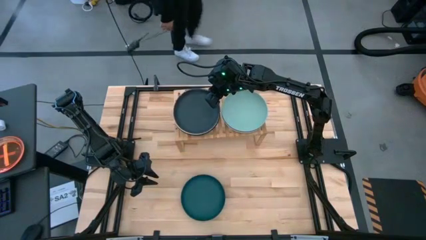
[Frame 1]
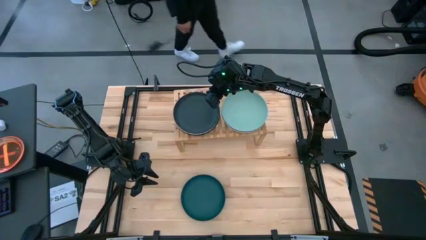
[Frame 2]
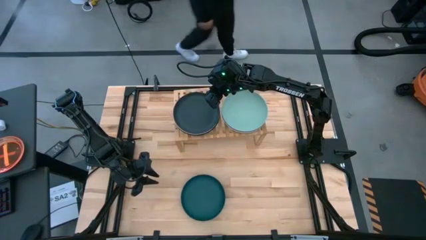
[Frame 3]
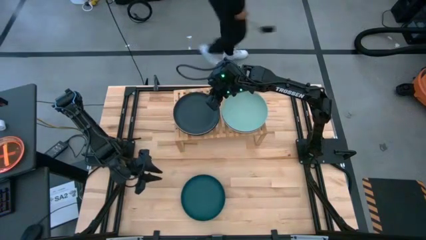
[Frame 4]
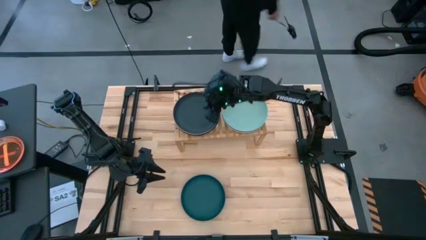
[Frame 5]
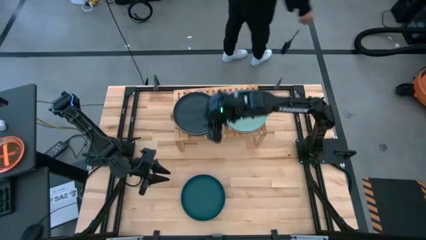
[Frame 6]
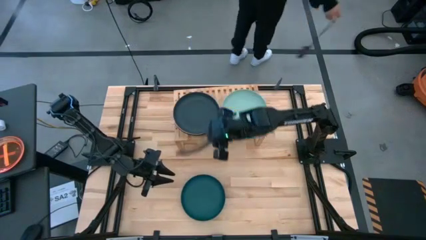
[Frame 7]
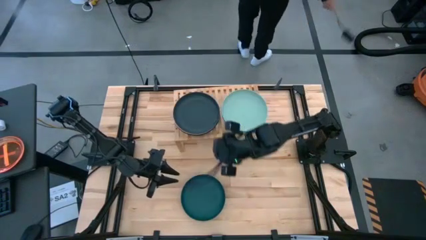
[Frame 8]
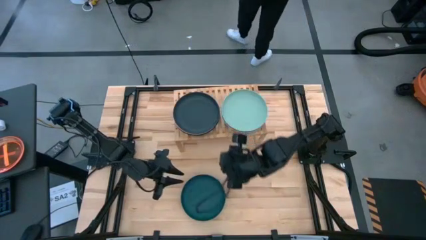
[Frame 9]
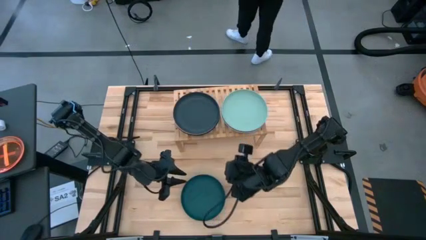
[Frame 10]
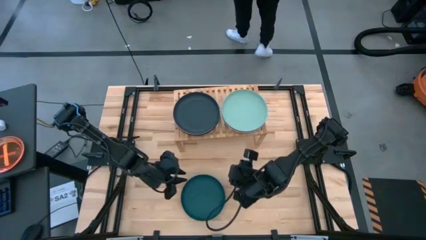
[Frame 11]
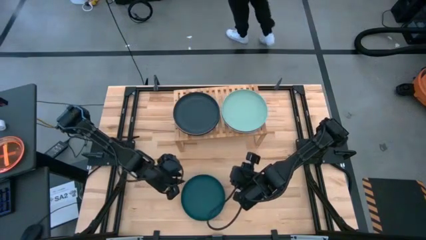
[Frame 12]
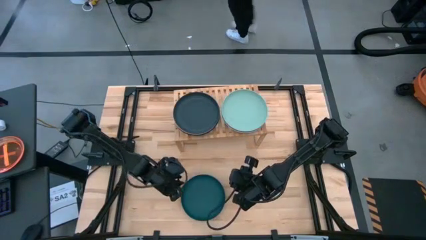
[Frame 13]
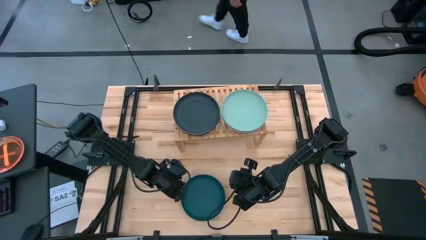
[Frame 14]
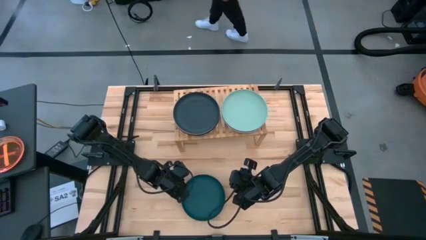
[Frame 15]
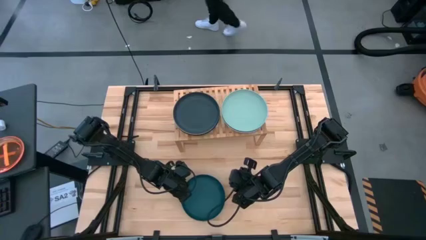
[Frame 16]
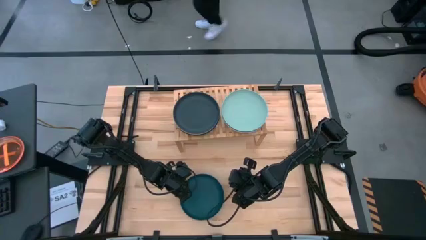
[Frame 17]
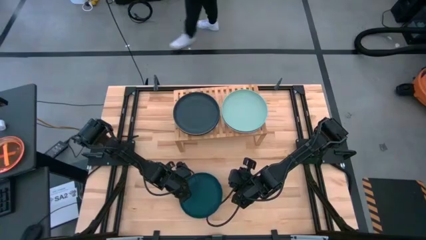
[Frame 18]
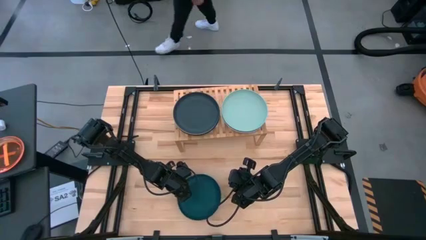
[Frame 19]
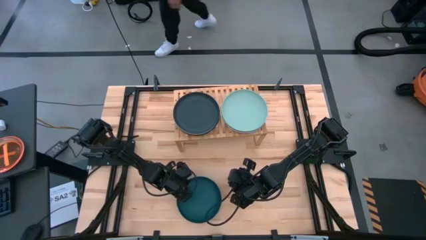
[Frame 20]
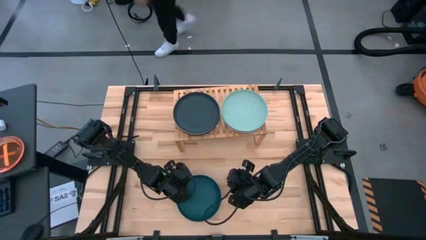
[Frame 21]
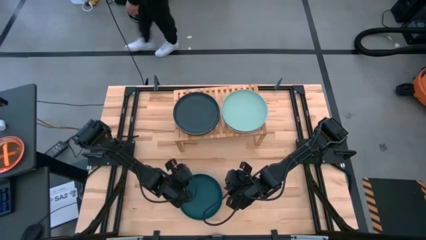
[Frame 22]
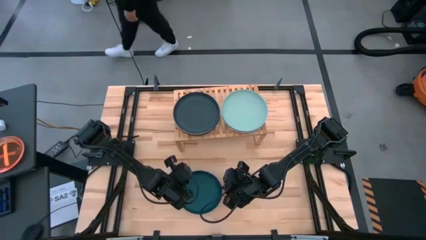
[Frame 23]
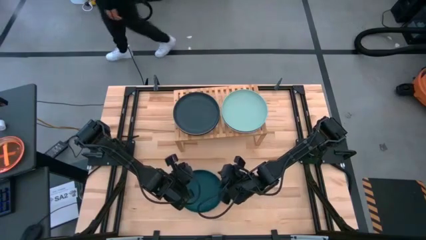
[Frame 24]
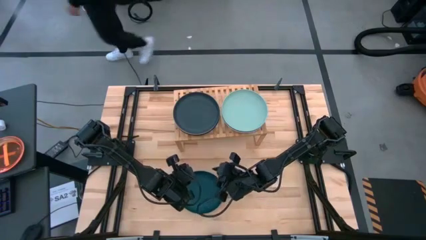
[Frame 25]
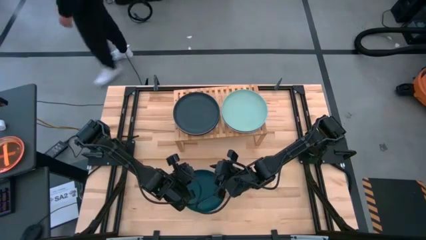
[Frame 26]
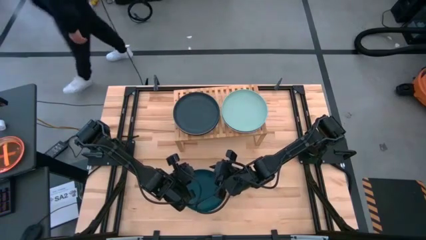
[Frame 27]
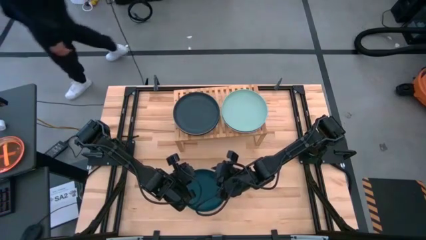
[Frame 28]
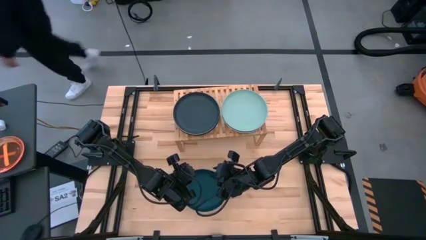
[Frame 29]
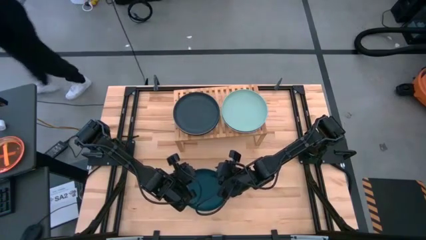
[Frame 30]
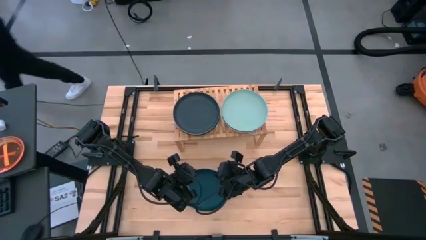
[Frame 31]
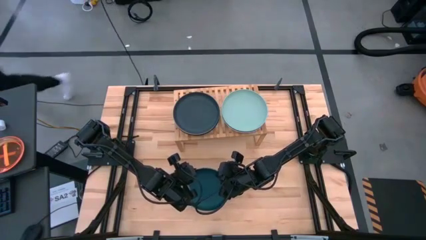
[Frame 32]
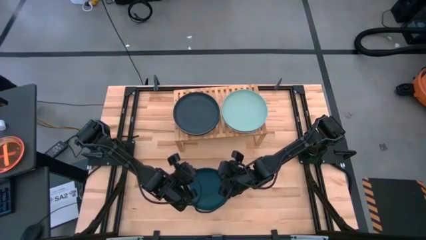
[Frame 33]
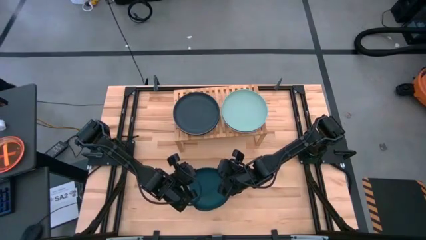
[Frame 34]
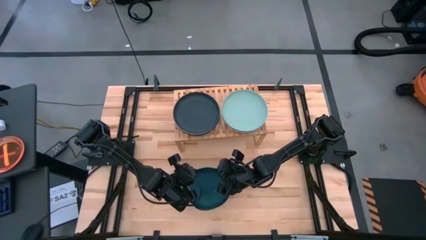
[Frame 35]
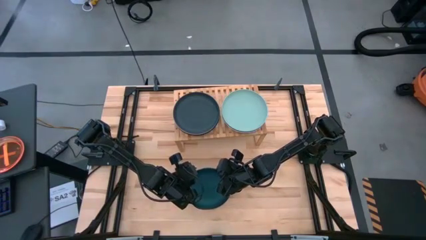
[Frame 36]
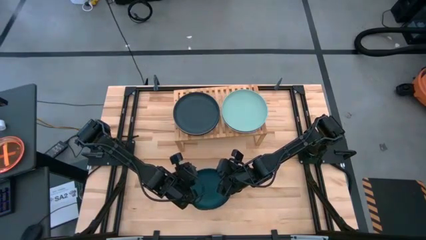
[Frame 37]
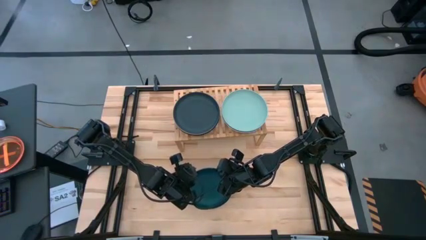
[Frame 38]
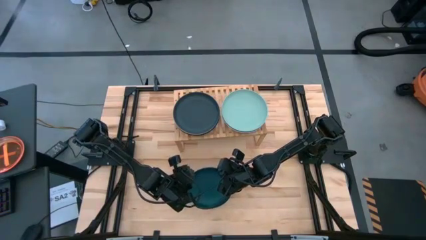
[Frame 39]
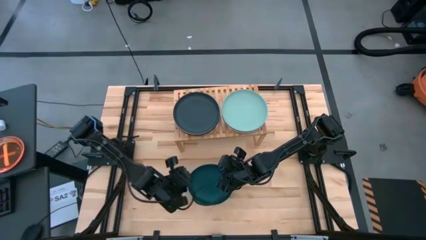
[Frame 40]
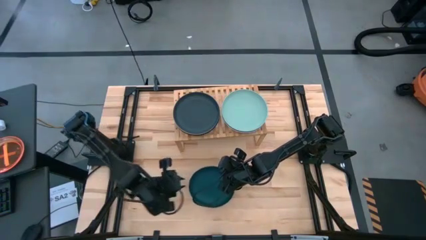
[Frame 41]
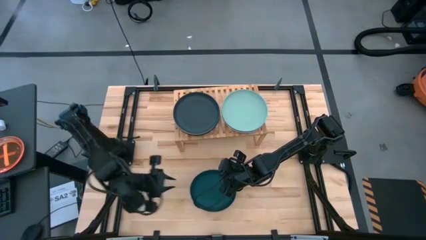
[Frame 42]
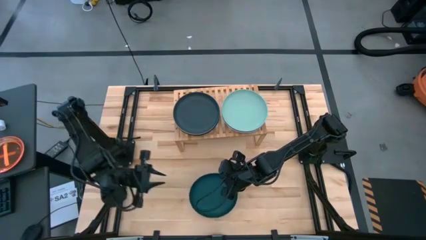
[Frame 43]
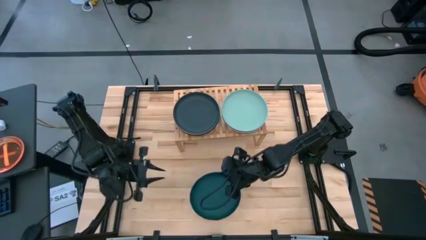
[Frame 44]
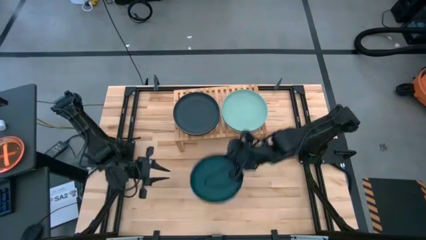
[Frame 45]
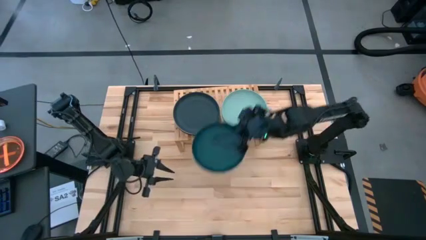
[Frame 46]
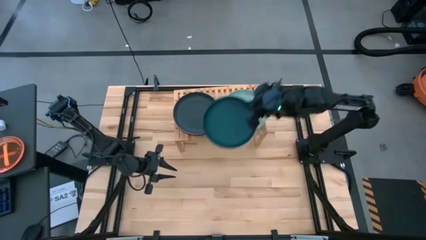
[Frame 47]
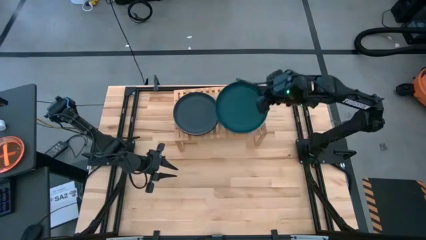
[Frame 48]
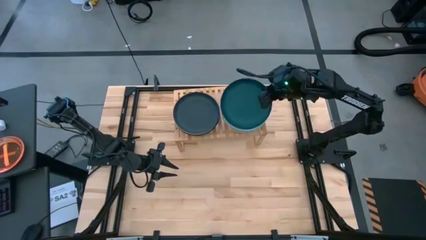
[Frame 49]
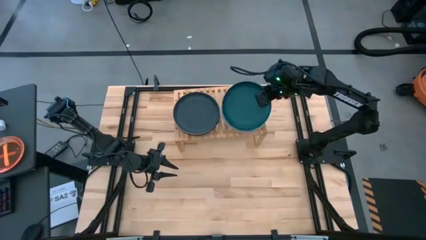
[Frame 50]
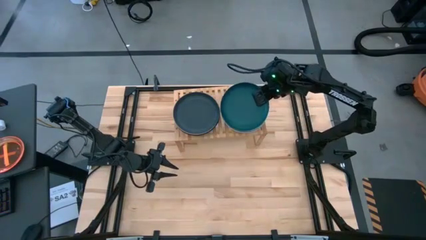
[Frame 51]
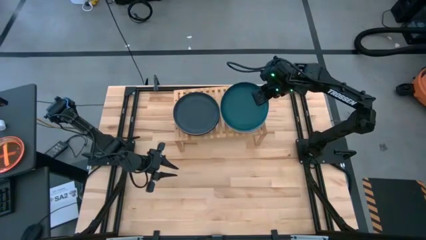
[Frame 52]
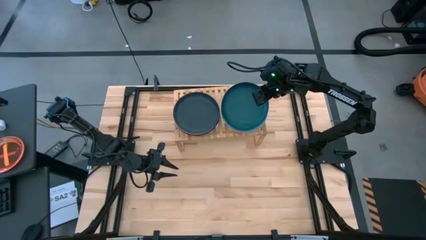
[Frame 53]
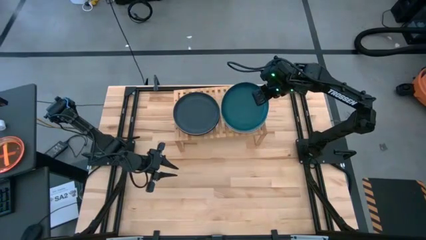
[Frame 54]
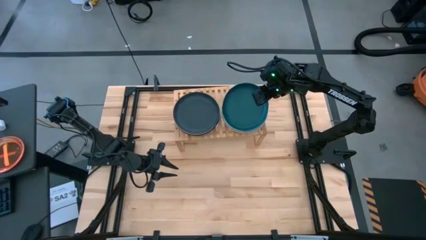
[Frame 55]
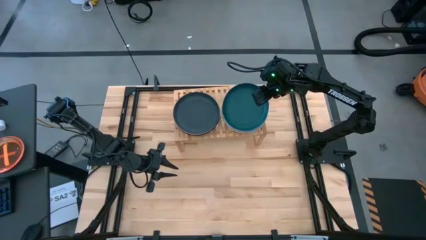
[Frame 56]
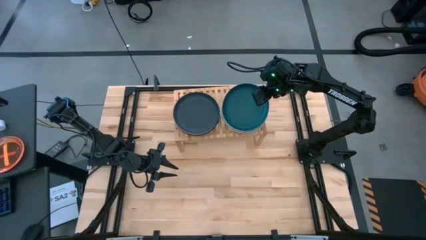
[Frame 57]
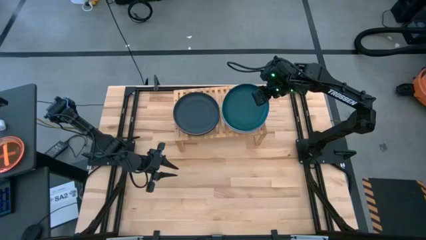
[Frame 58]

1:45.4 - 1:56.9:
Task: Place and stack plates onto a shelf
Stack the dark green plate on top of green plate on the shelf

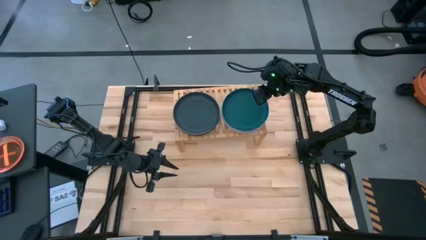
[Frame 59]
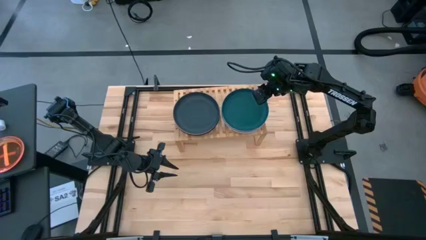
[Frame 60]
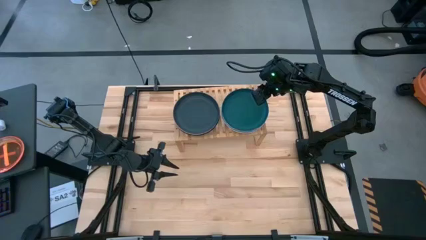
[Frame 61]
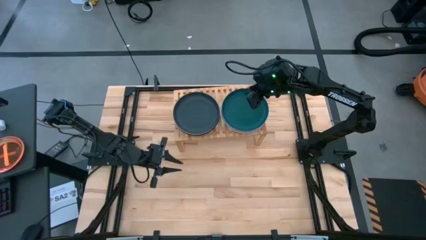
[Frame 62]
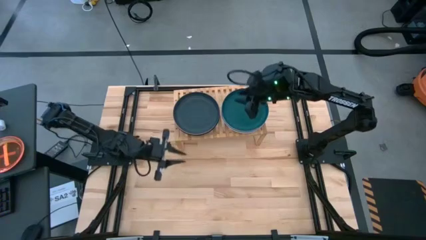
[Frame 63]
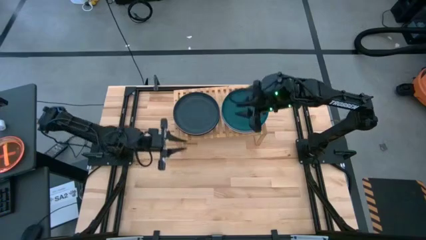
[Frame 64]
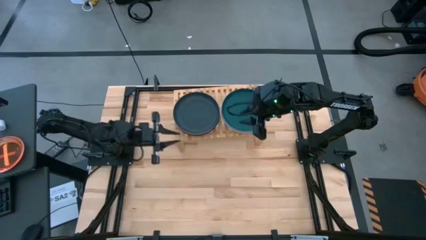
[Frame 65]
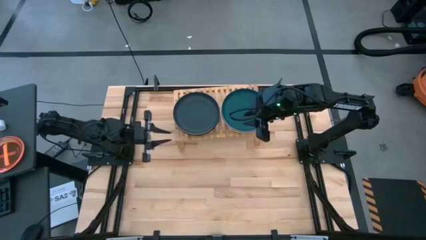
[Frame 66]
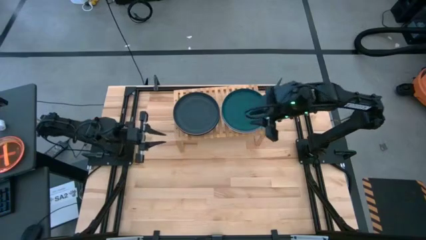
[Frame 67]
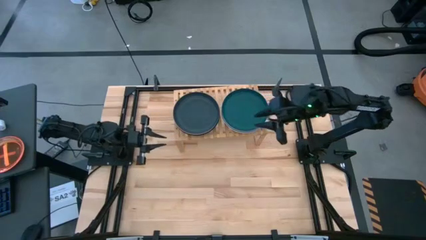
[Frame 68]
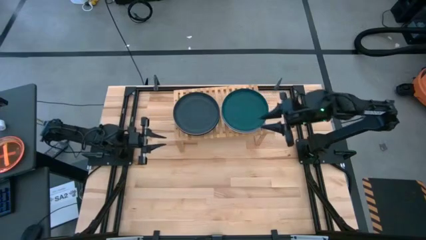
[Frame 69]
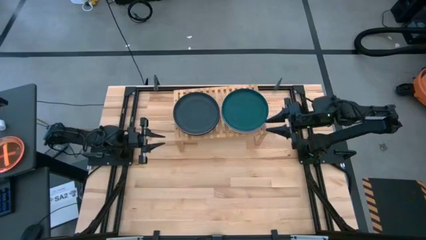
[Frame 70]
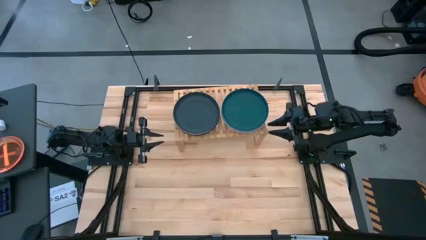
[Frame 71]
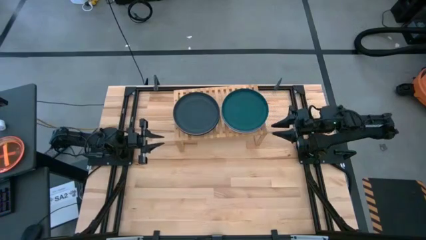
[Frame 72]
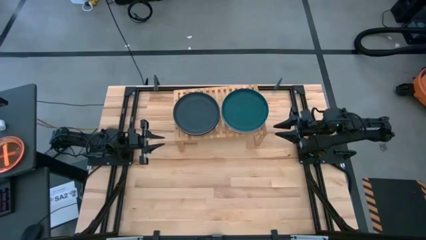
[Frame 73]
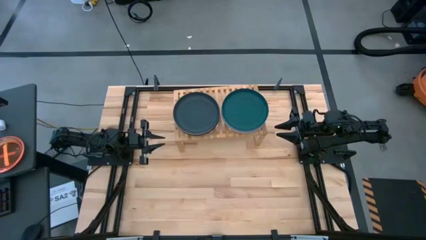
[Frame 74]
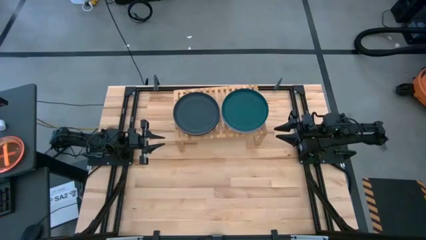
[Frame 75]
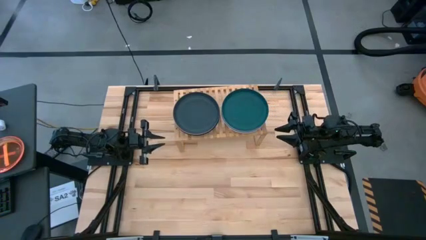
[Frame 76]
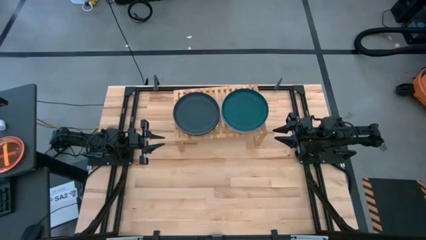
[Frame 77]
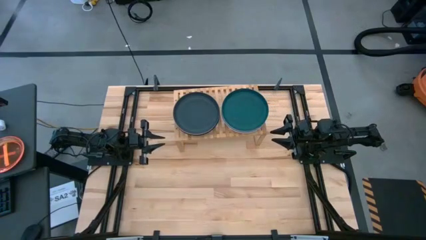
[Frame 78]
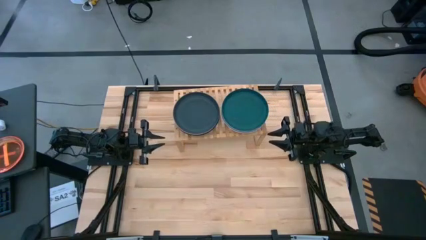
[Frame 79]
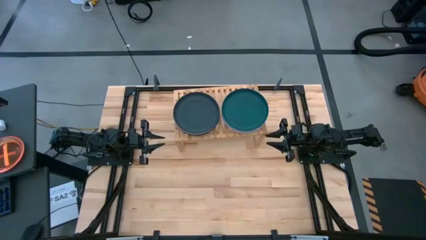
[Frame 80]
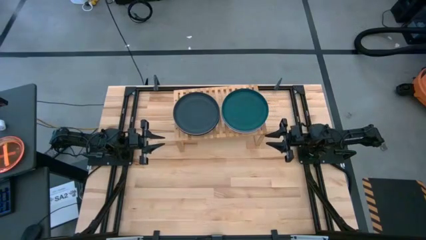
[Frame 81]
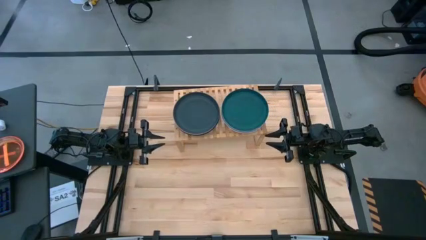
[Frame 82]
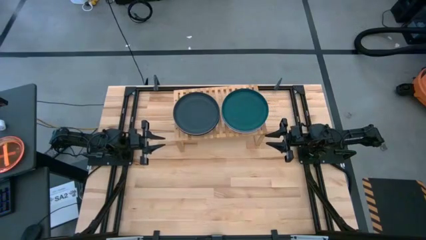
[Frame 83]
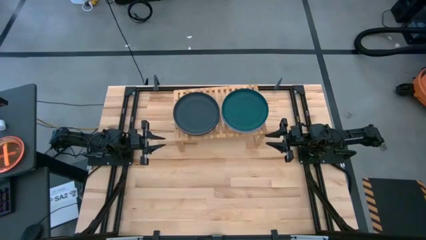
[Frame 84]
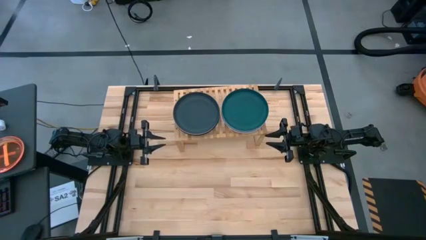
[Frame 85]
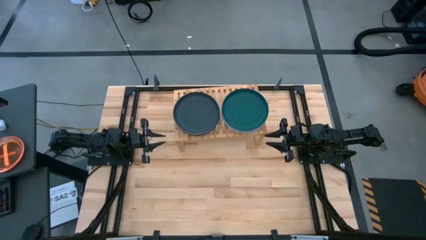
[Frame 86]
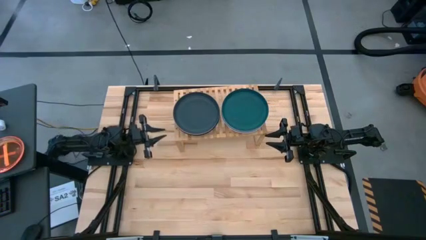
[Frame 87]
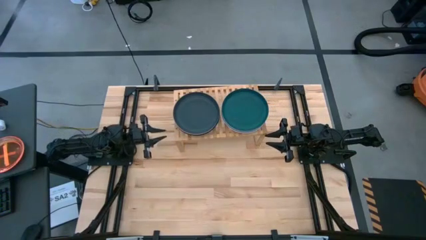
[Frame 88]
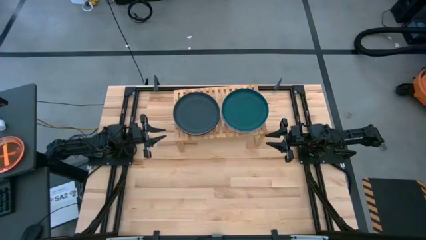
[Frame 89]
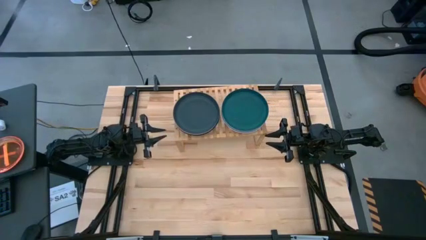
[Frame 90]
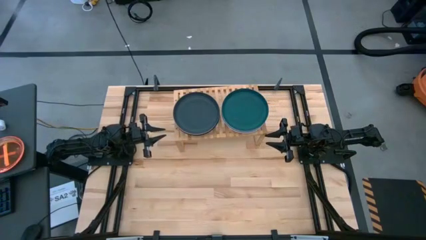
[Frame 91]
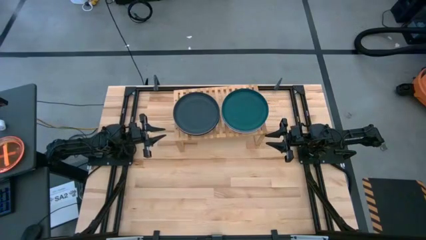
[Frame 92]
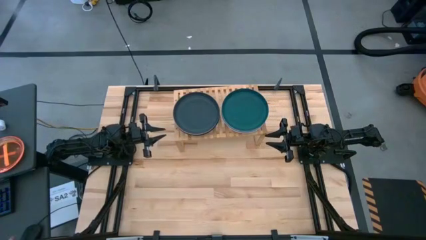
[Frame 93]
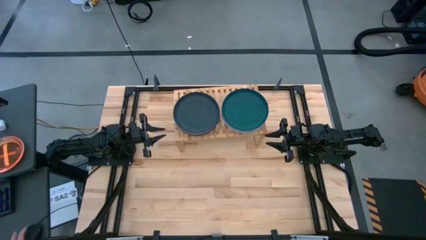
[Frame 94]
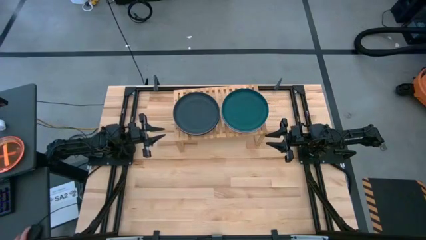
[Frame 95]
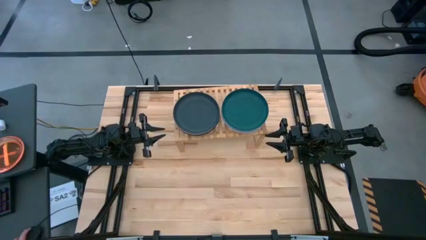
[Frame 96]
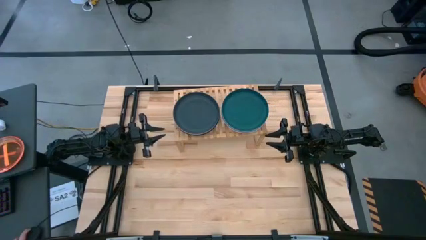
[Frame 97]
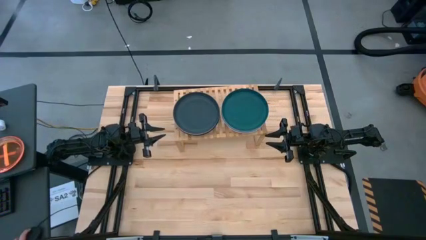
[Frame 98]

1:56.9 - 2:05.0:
Return to Home Position
